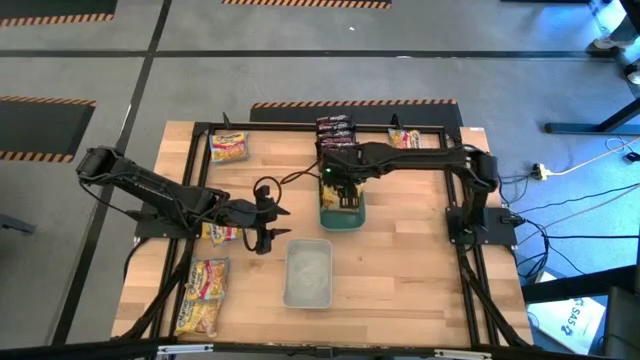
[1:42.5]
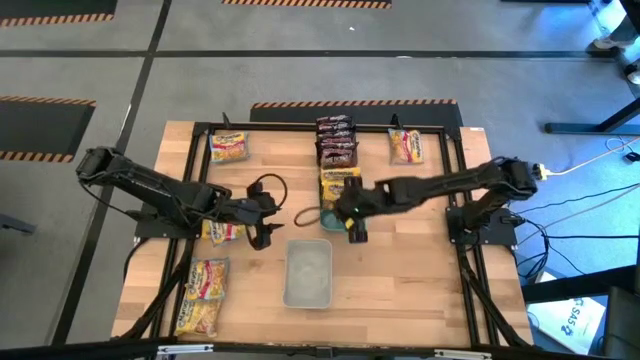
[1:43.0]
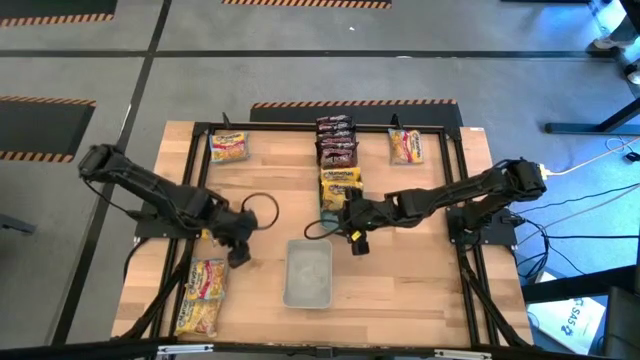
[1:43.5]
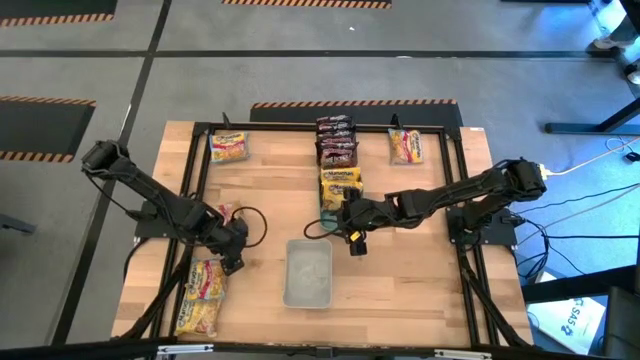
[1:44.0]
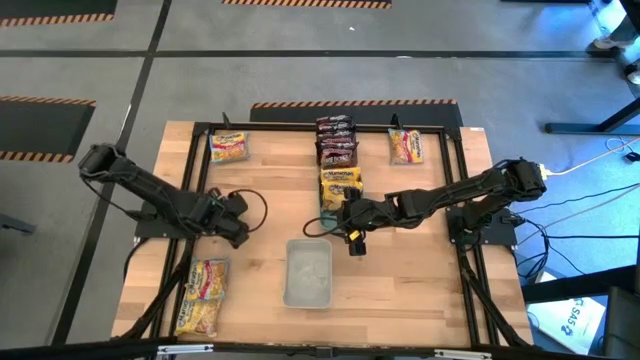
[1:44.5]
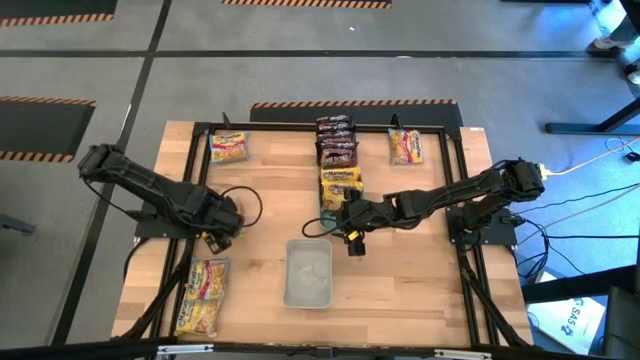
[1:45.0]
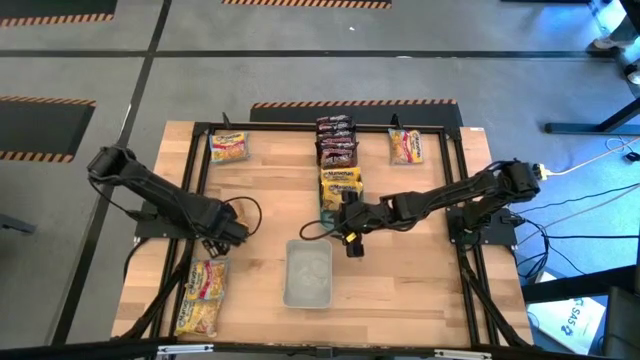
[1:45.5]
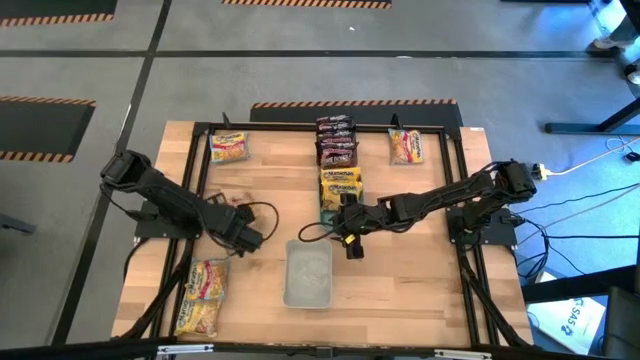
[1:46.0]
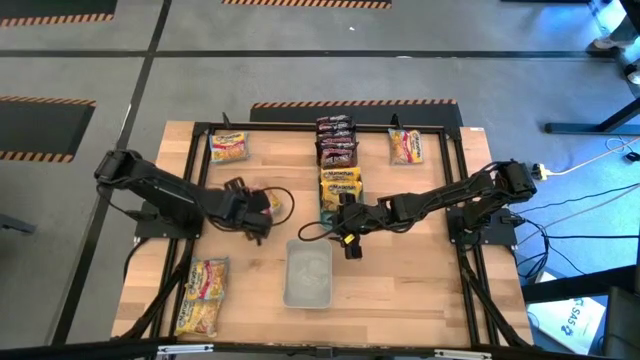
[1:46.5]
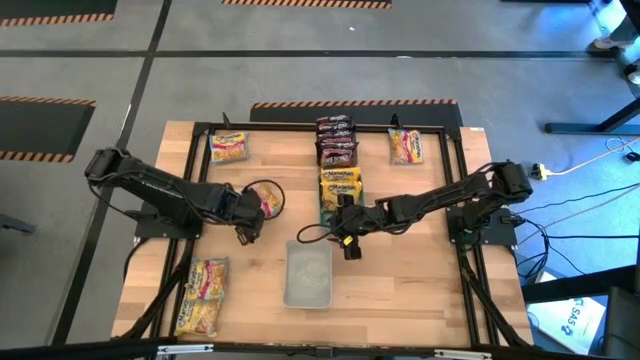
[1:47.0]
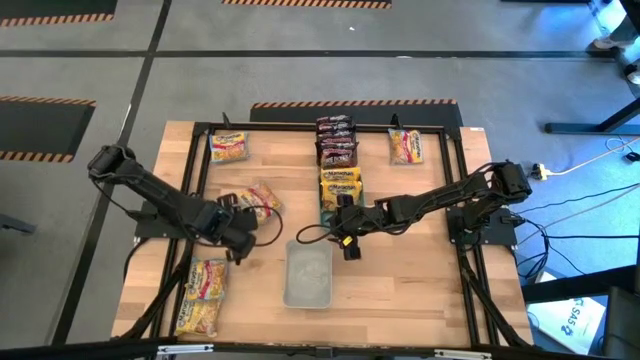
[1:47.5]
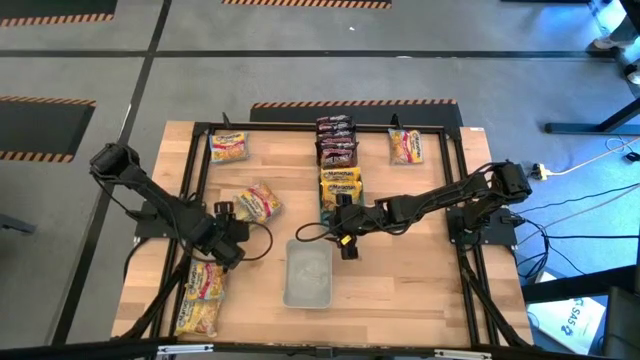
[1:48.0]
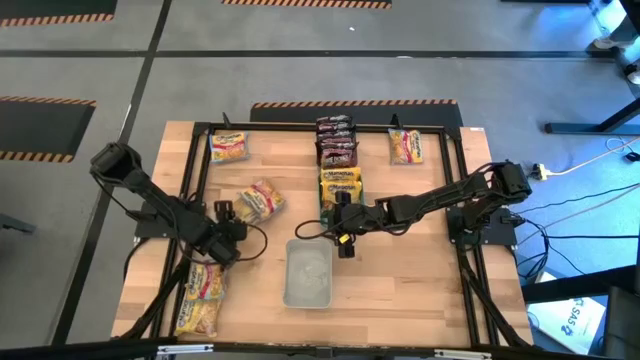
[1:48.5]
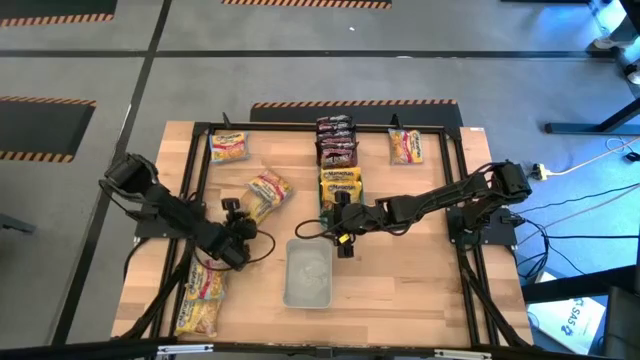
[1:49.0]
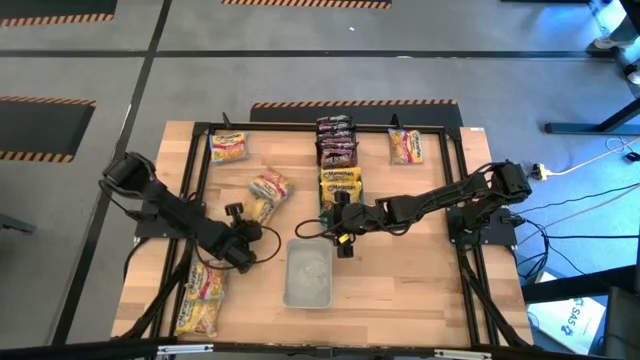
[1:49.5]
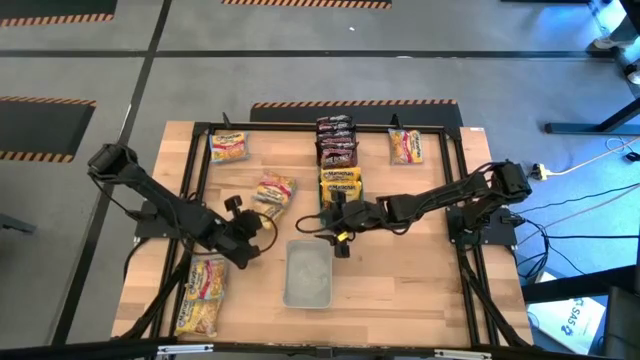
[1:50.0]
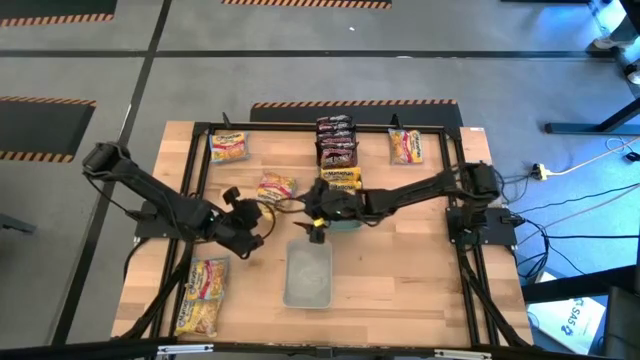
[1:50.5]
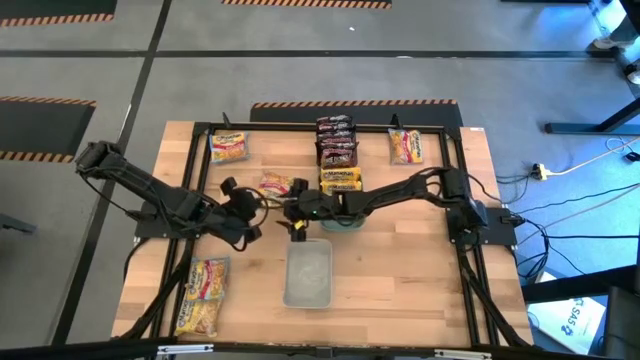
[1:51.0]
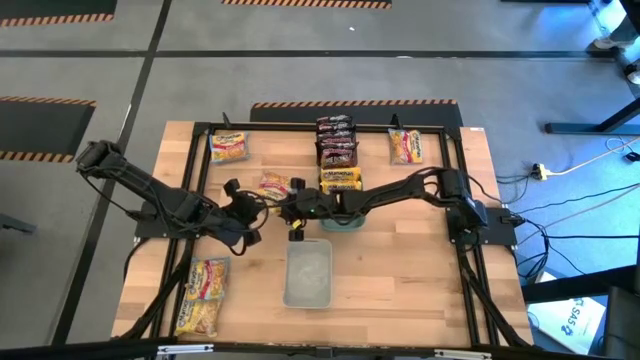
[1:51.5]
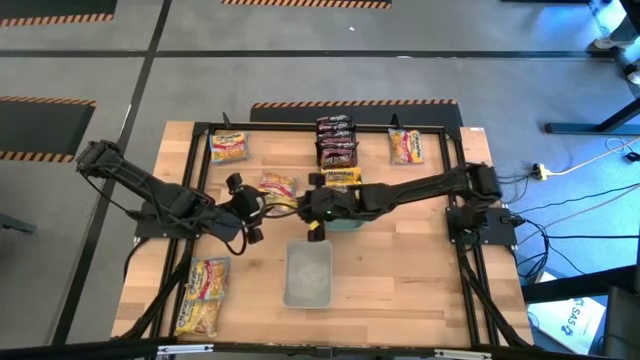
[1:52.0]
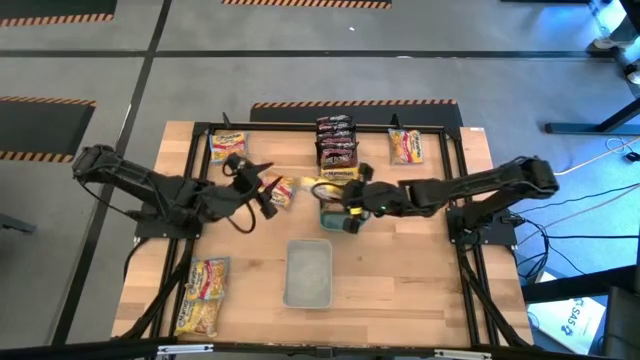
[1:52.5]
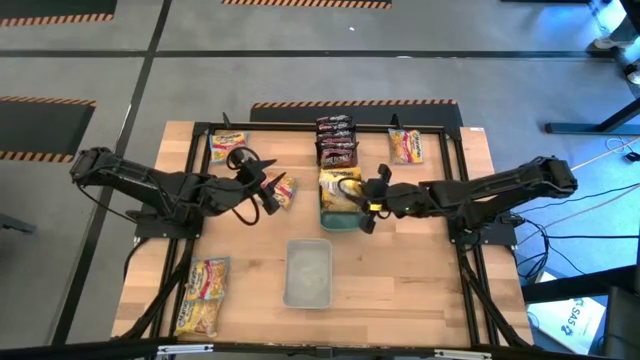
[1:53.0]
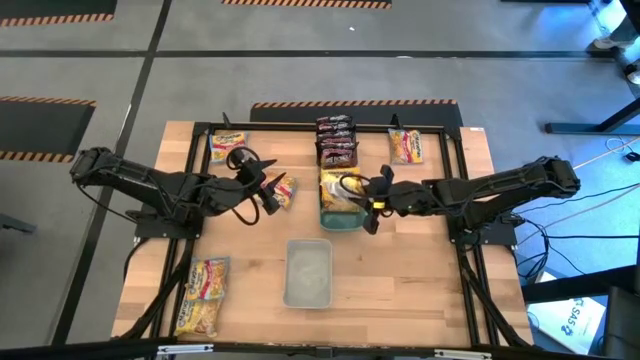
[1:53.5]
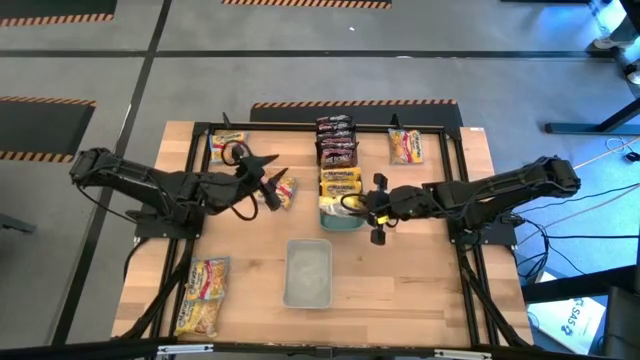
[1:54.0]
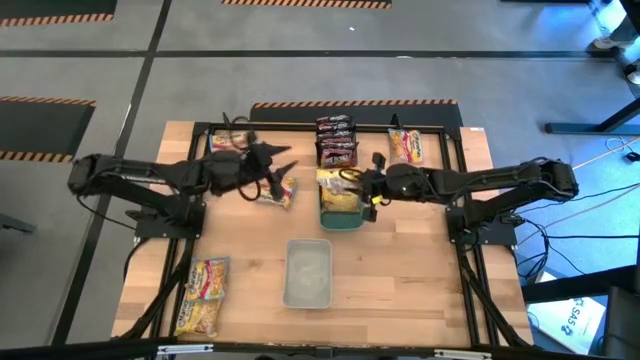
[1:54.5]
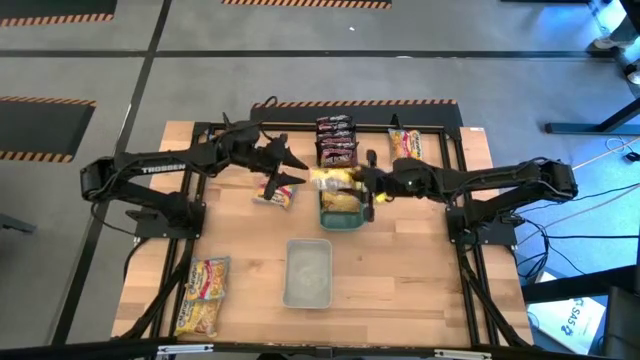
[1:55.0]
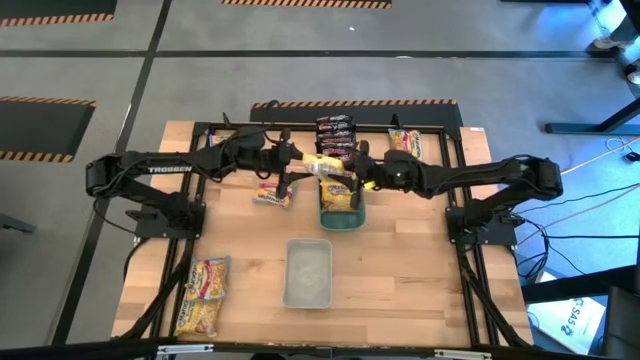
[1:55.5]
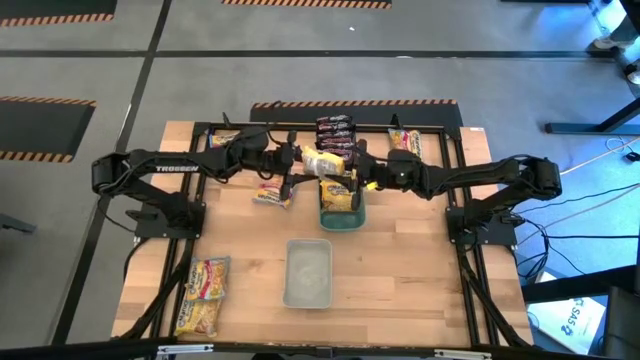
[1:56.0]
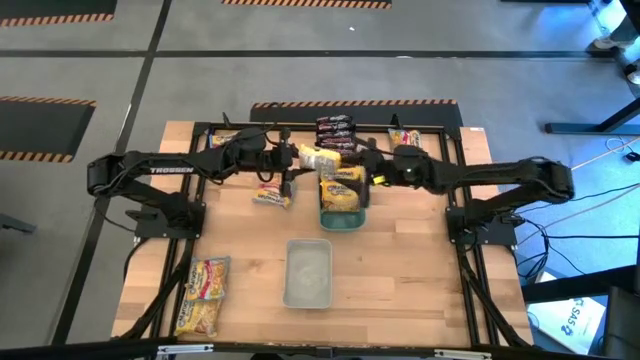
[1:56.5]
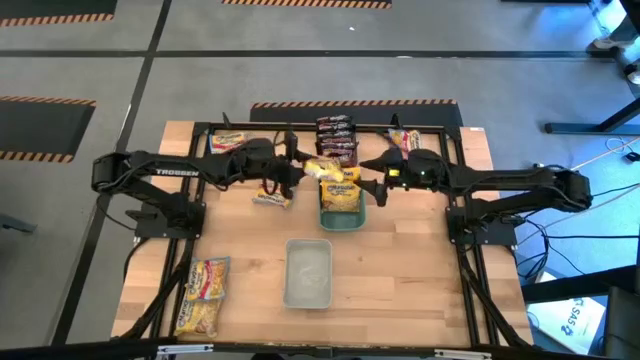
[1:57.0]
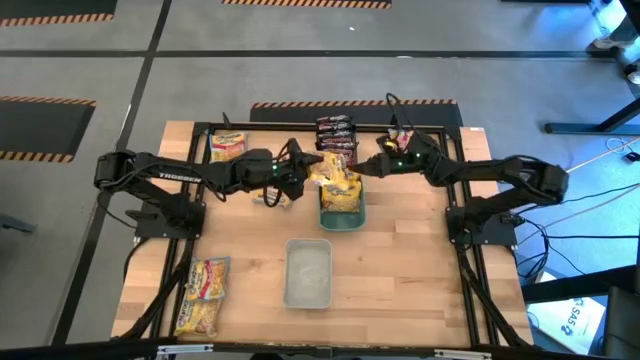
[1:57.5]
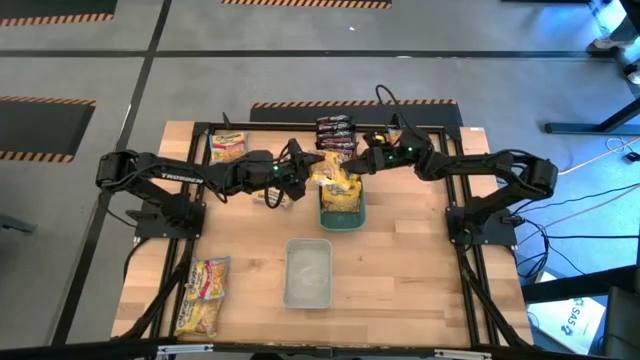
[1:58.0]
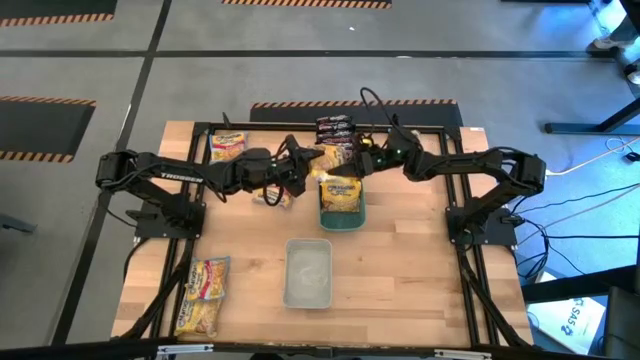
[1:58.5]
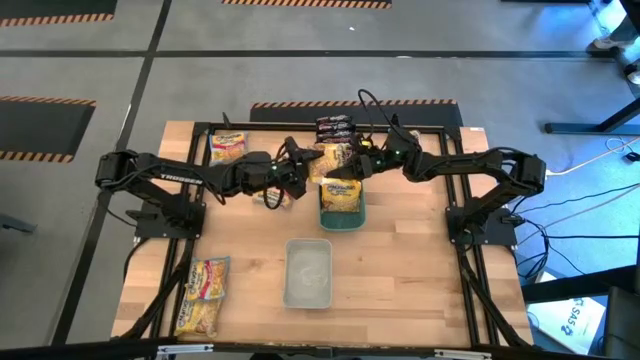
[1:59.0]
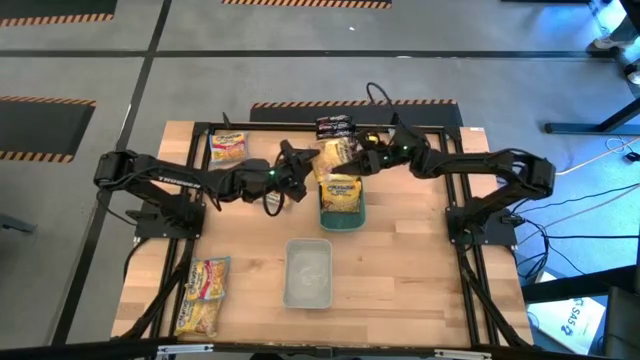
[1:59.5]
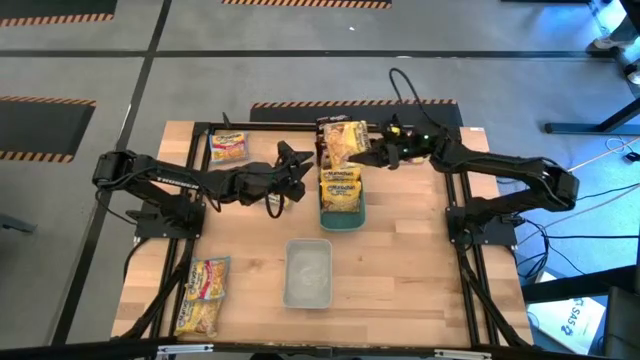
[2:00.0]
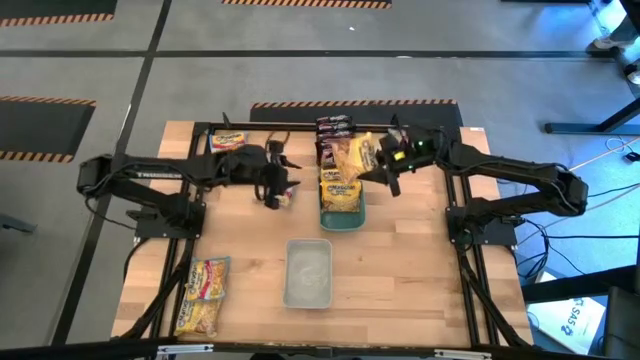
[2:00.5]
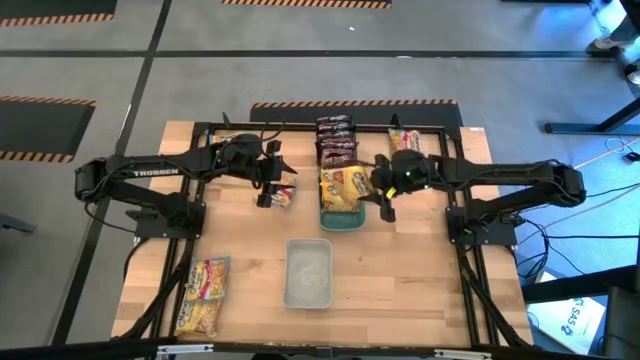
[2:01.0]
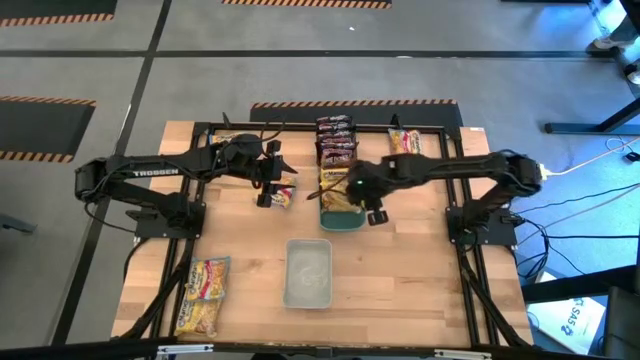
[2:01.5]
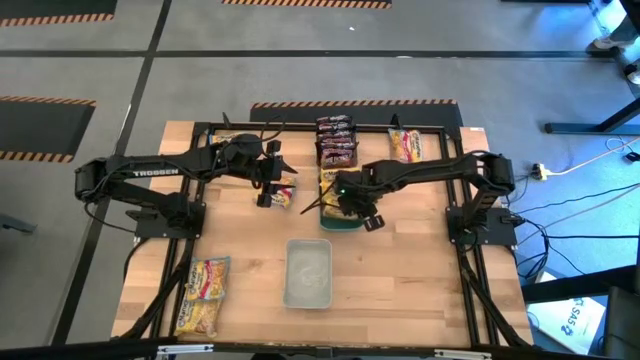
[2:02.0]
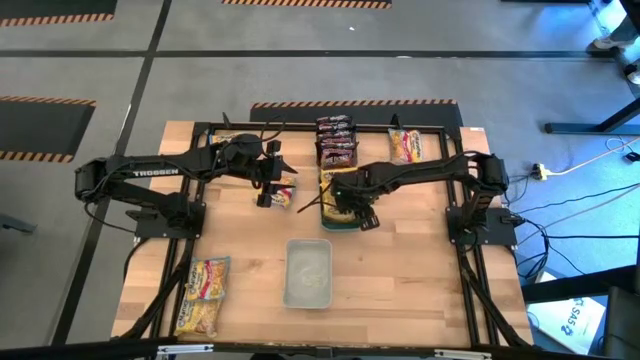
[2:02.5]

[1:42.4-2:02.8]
Task: Sort Maruchan noodles
Put the yellow noodle pack into the green bin
